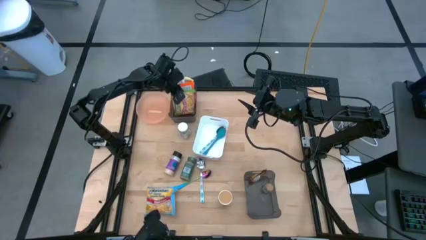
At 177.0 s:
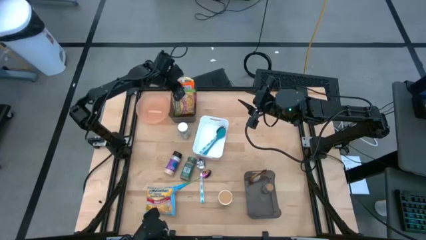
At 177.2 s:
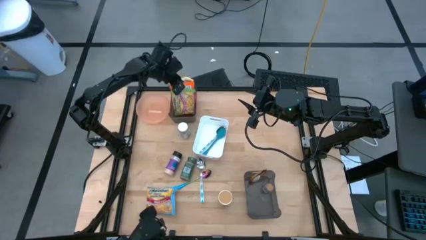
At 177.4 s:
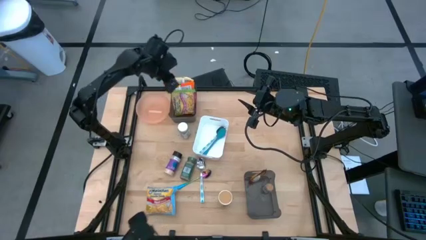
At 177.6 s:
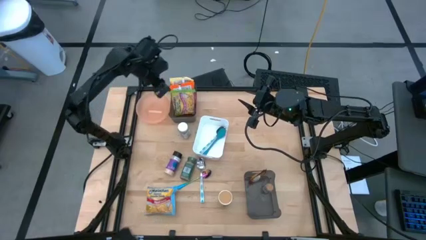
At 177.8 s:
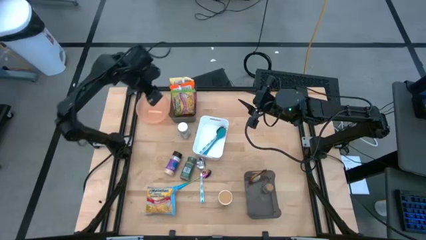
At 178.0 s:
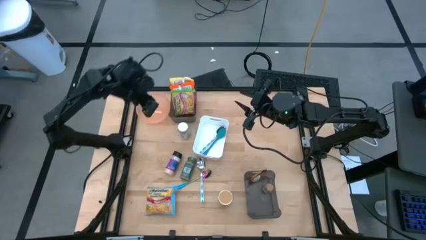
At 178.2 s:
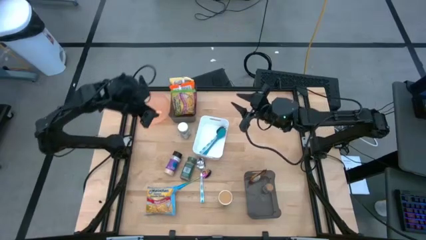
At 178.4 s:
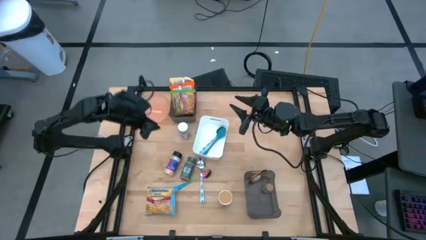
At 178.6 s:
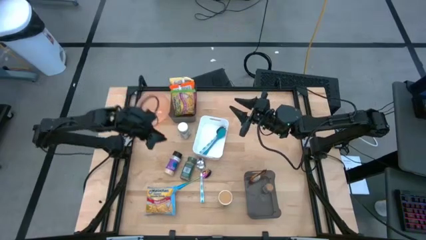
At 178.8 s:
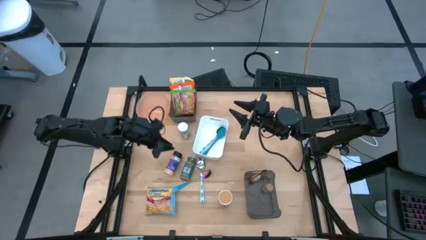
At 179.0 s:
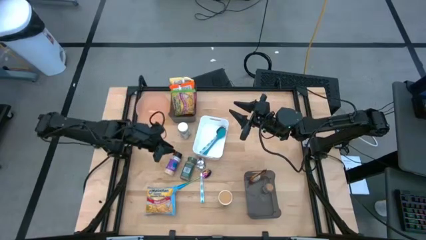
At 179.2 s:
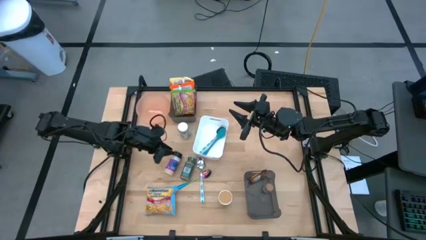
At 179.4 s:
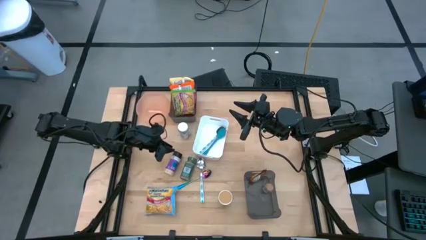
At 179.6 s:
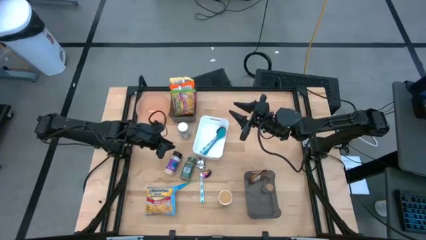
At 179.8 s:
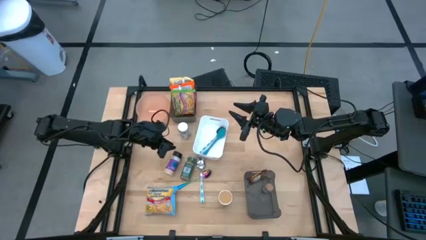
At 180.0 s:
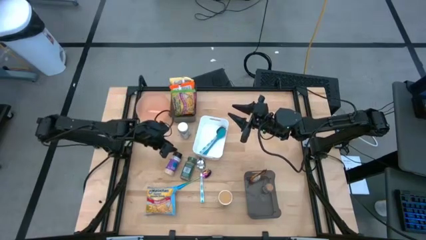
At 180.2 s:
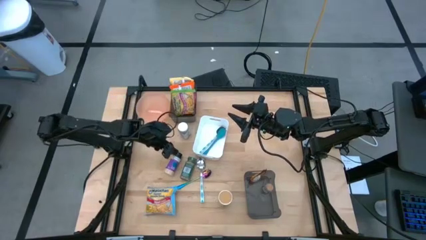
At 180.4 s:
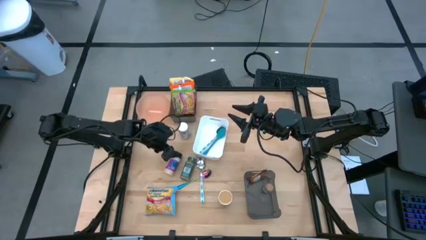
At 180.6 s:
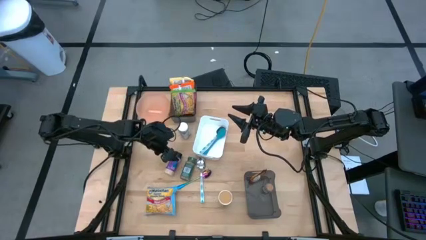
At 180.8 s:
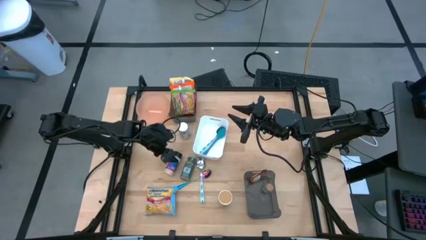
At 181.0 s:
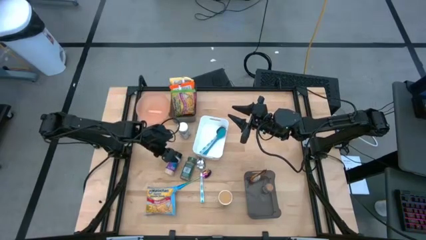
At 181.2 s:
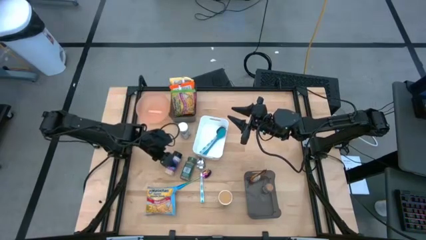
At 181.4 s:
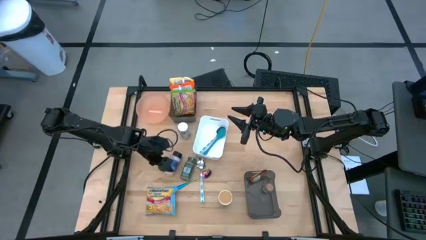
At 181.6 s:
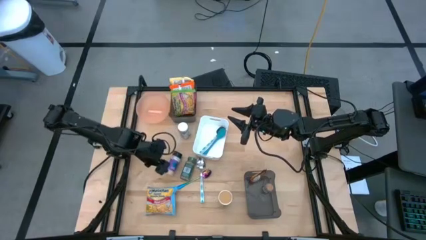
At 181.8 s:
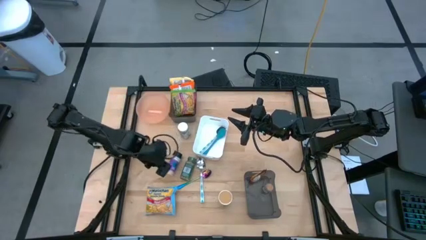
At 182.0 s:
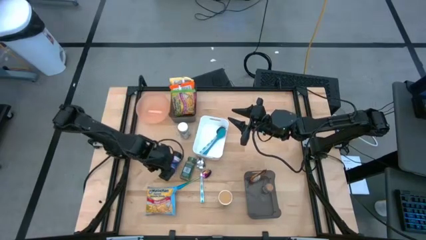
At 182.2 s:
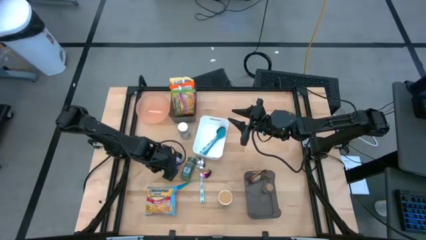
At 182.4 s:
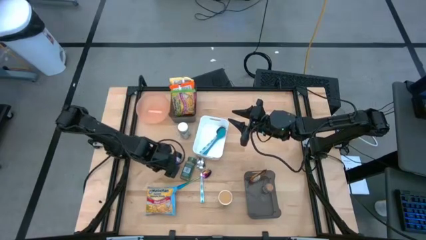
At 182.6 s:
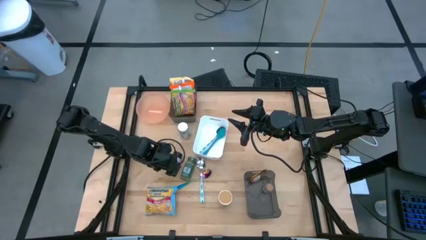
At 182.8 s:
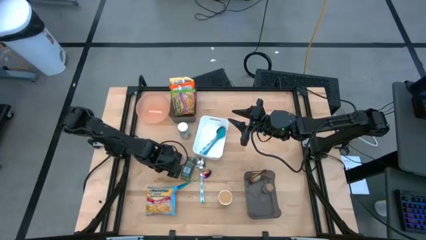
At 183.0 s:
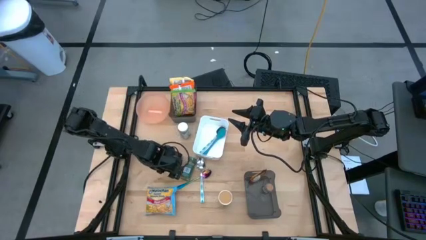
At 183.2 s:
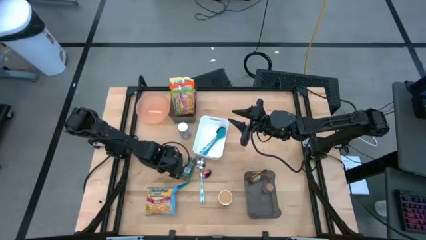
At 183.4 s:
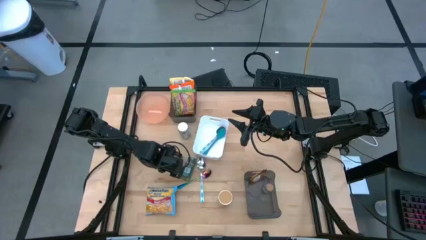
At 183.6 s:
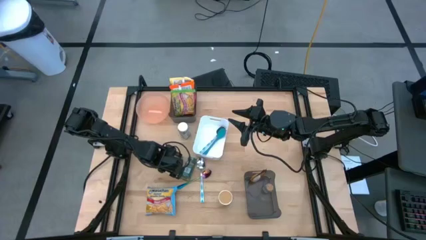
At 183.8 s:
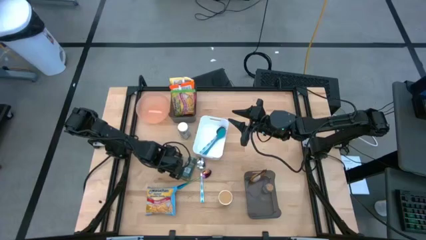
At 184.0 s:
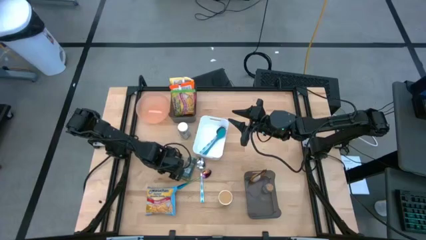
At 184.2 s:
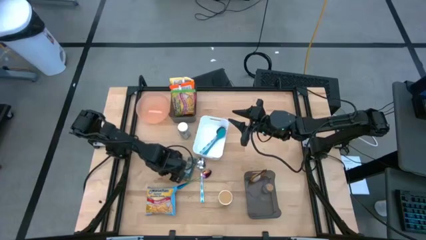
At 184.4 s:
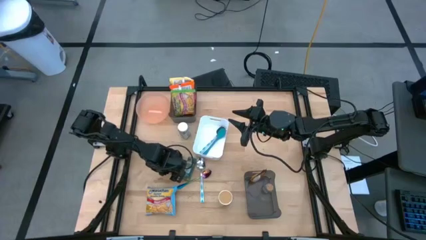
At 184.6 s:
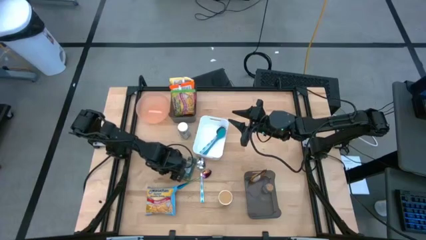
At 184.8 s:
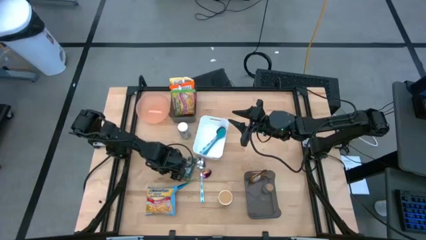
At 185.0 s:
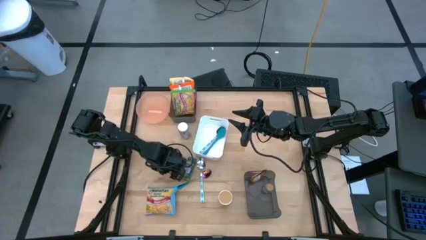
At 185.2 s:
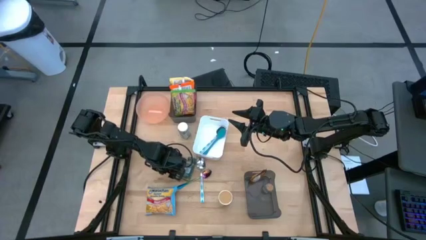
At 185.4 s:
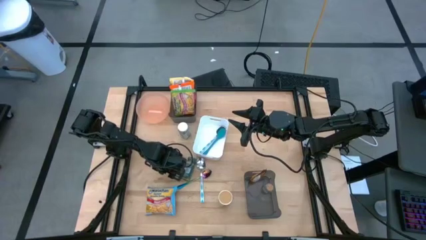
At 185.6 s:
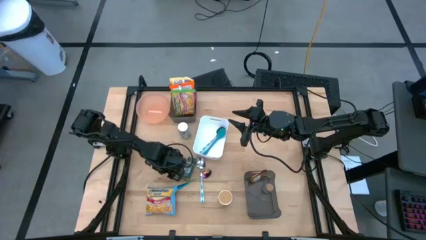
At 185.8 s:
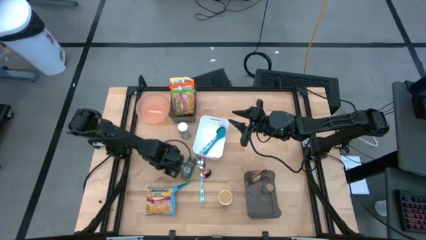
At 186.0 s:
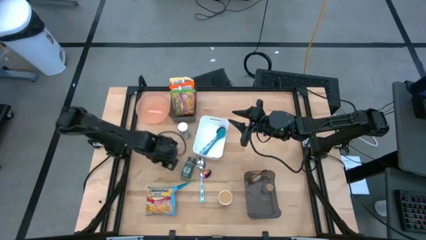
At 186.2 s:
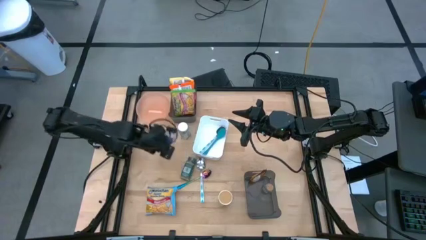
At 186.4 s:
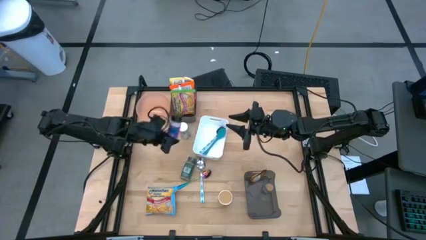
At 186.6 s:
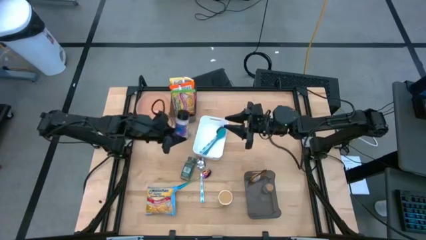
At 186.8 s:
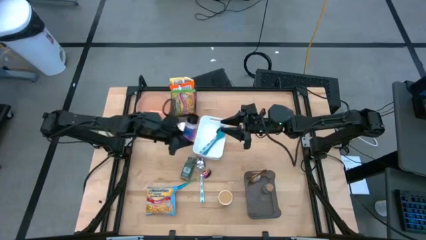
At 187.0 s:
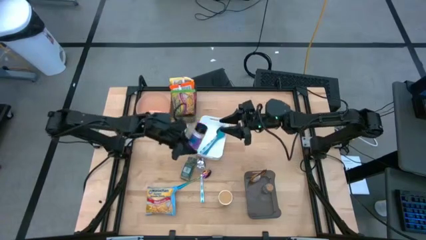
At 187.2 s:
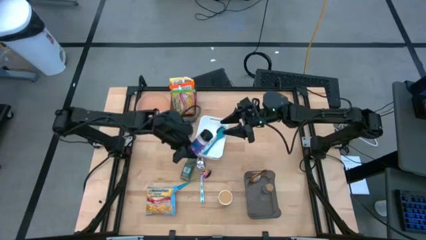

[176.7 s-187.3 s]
Task: Pick & Place Food Item
Put the black seasoning bottle into the bottom black bin

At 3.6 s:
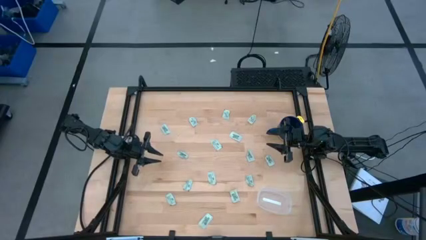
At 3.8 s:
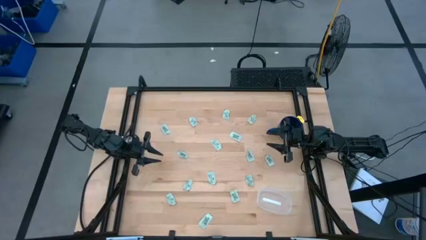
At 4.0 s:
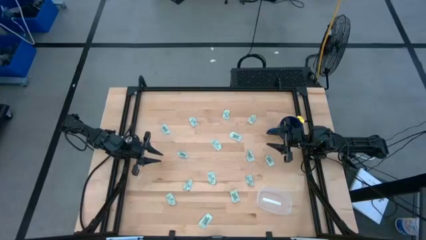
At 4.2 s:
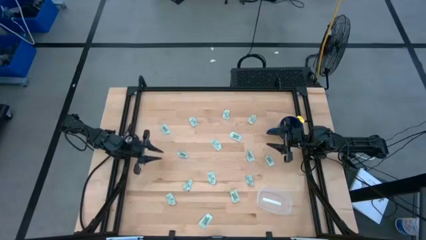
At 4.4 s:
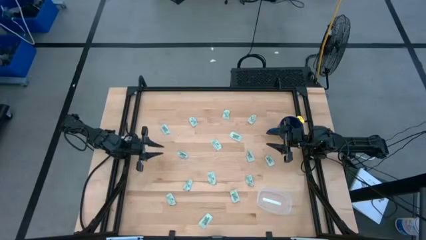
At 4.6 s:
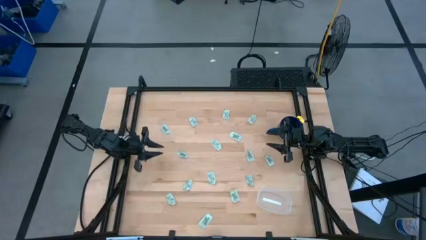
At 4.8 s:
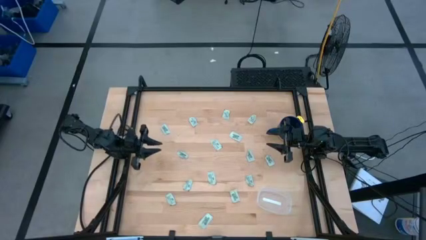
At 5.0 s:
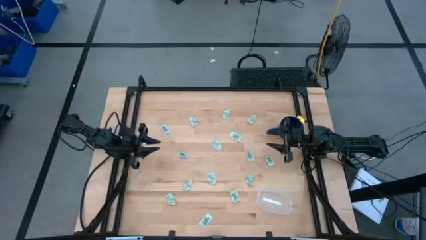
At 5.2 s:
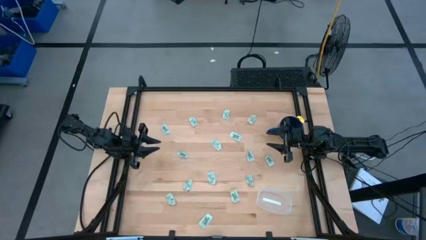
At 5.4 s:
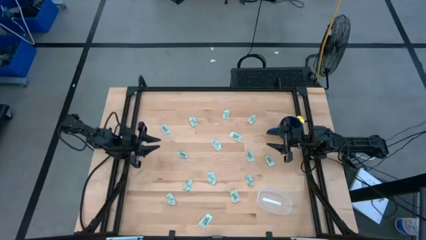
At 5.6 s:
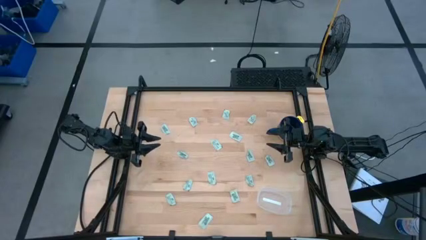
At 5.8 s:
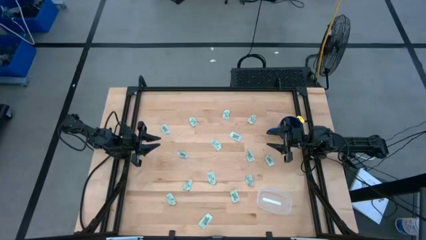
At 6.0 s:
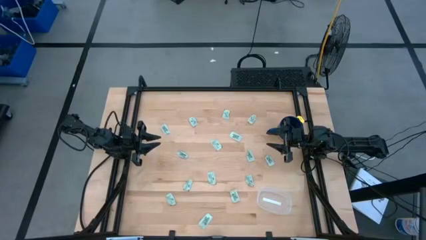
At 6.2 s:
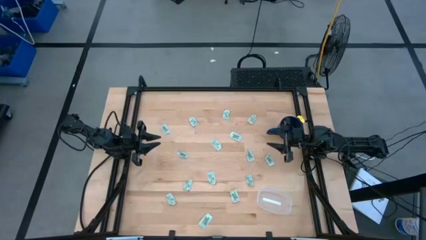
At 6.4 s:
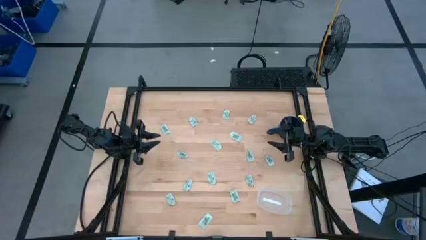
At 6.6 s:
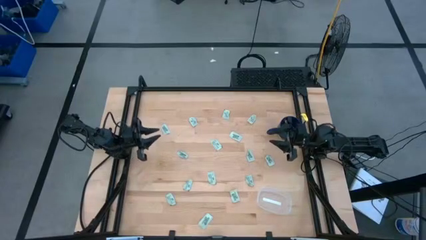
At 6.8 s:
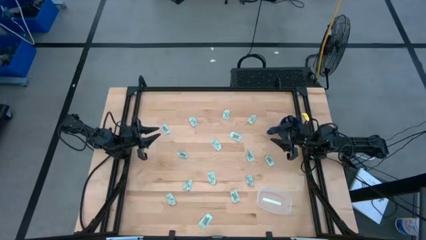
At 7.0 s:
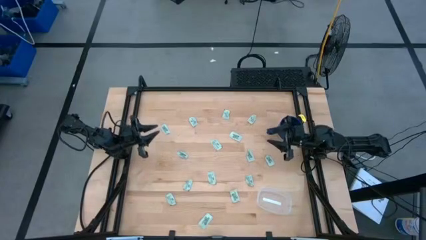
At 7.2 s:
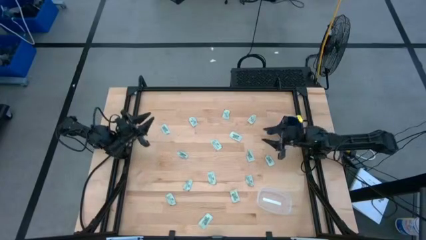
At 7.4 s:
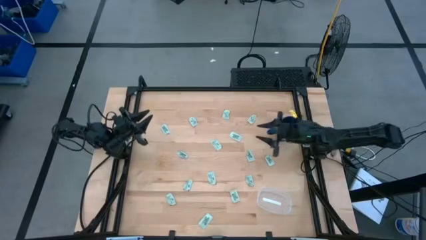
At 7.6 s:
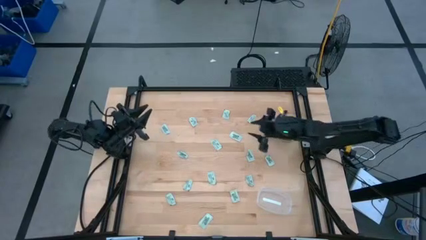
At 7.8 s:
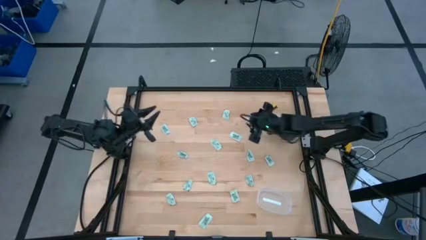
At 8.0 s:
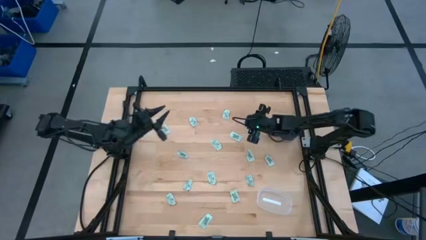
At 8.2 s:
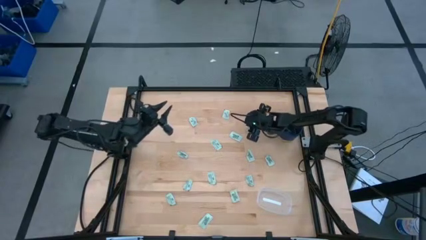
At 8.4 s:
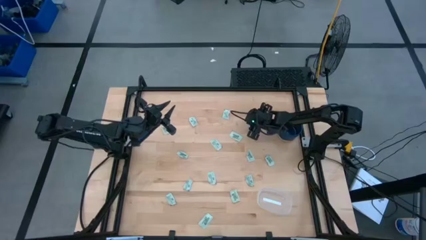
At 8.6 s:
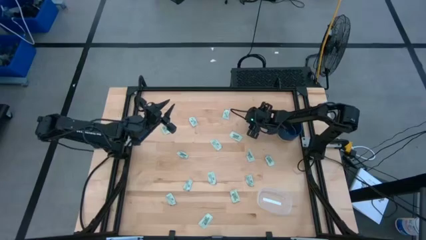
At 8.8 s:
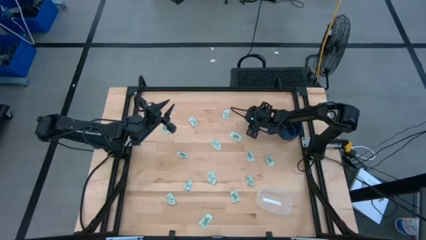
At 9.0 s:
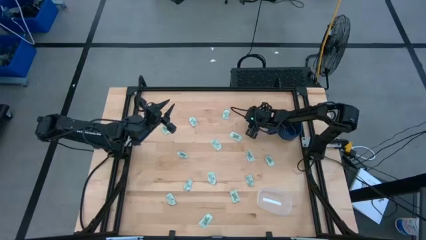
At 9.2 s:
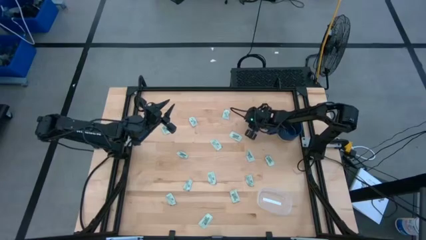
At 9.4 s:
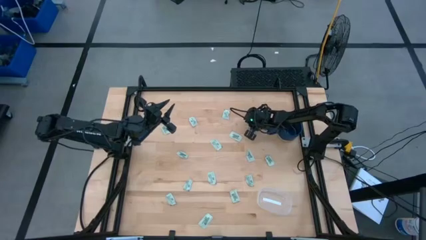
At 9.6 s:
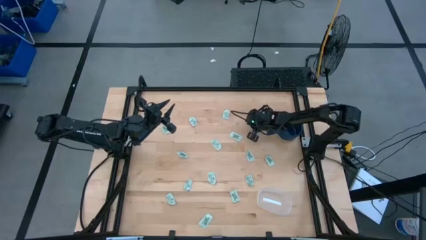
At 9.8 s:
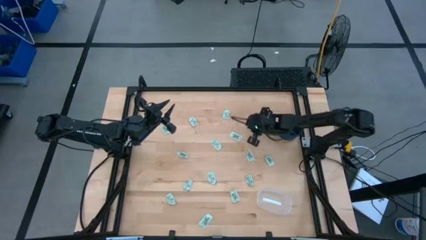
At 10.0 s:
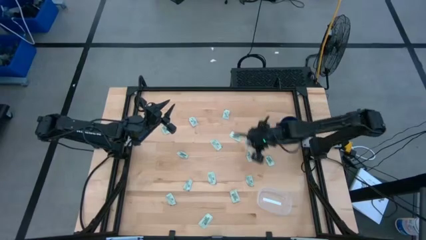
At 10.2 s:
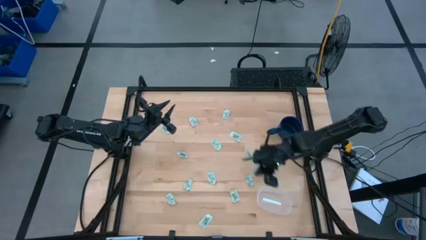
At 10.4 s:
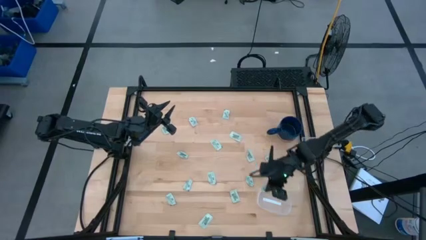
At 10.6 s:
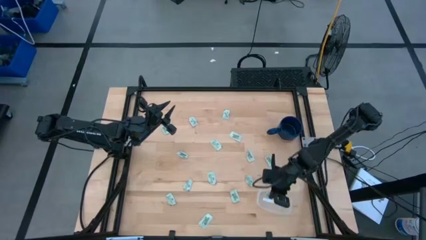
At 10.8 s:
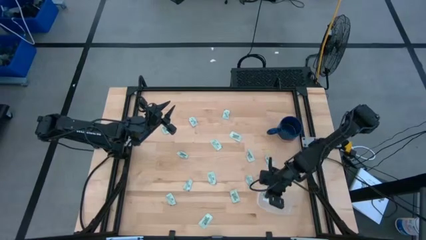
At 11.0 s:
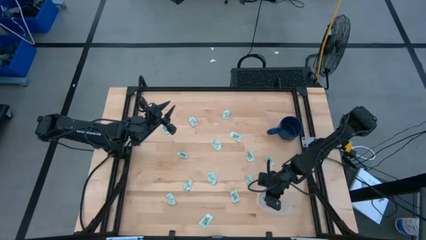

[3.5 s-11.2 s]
Task: Pick and place Stevia / Truvia into bins
Put the stevia packet into the transparent container
